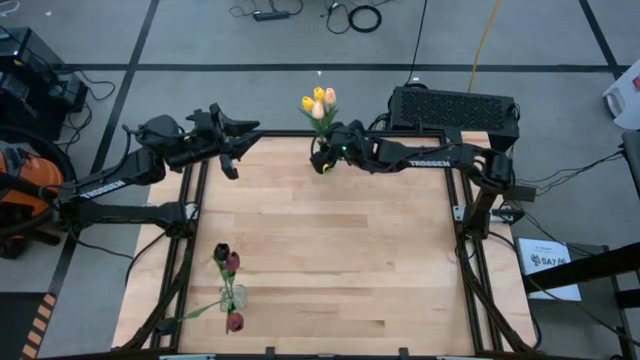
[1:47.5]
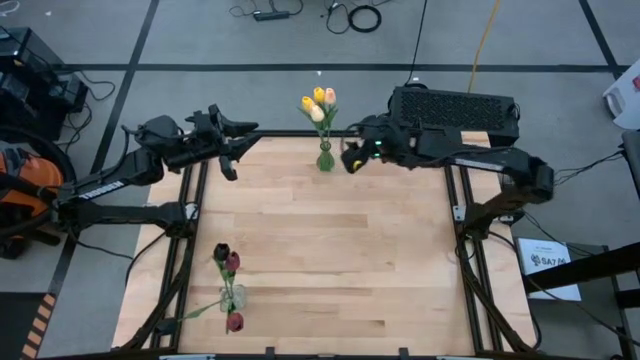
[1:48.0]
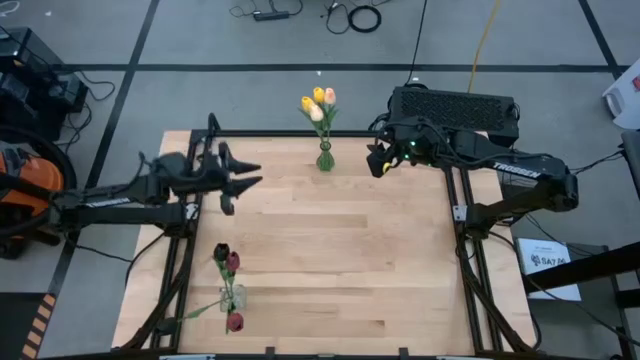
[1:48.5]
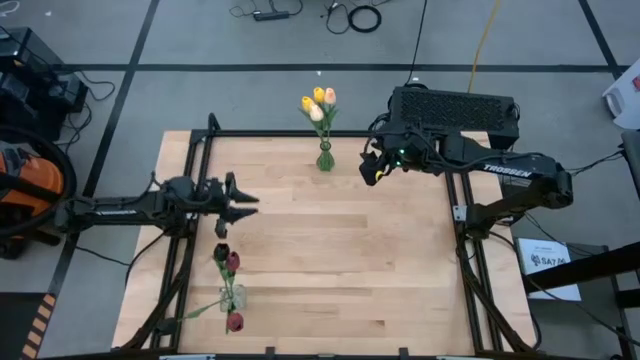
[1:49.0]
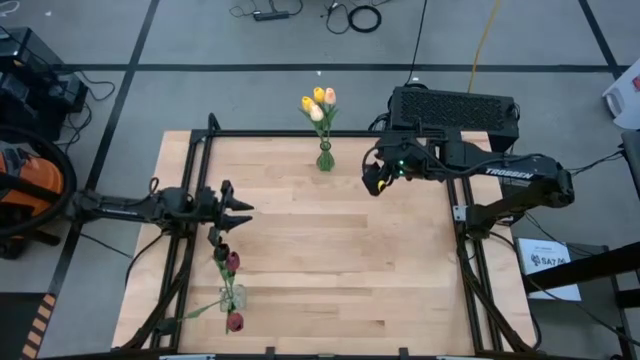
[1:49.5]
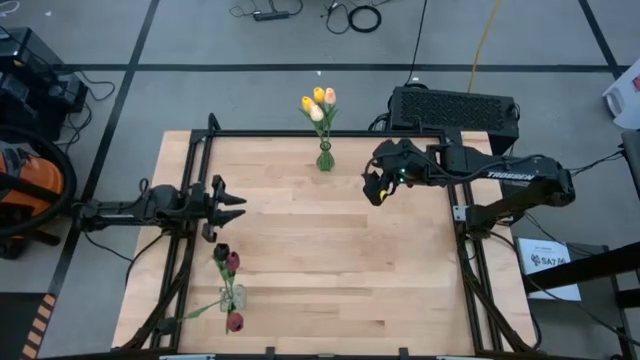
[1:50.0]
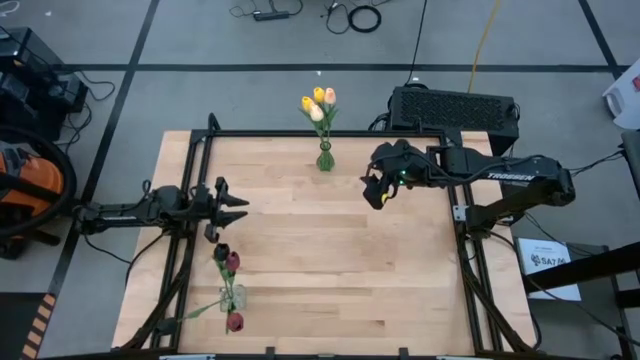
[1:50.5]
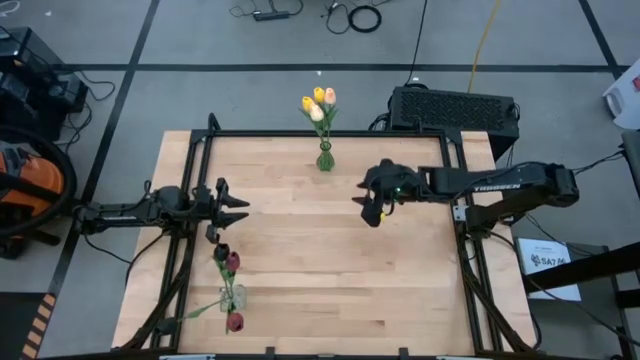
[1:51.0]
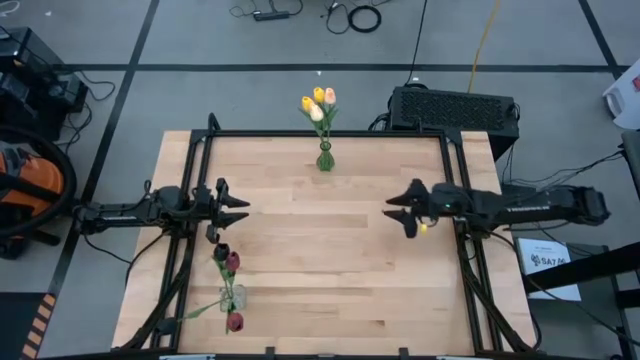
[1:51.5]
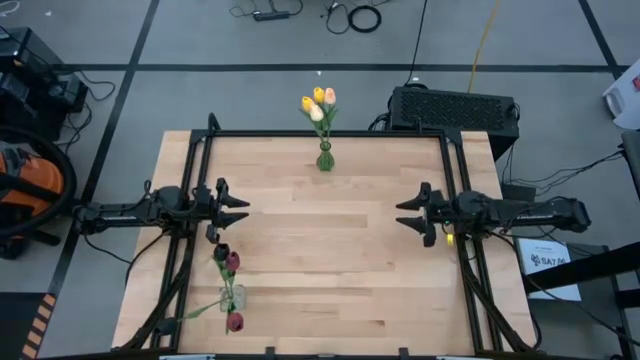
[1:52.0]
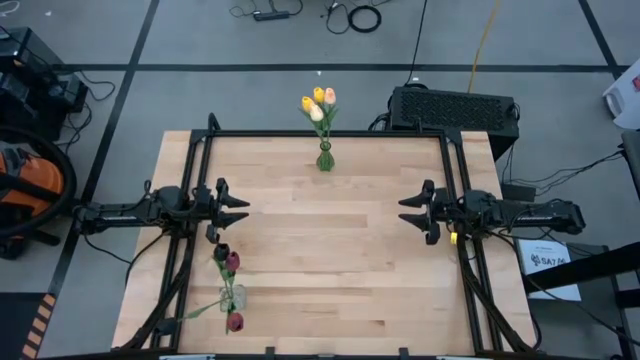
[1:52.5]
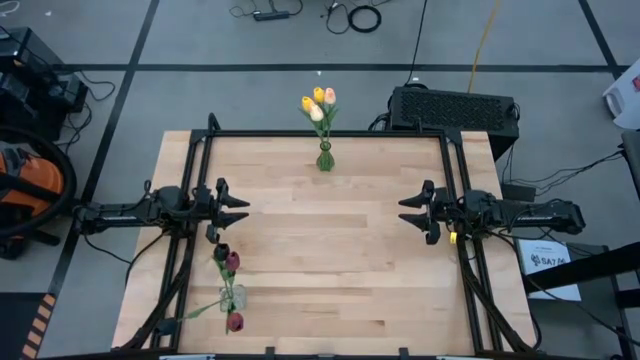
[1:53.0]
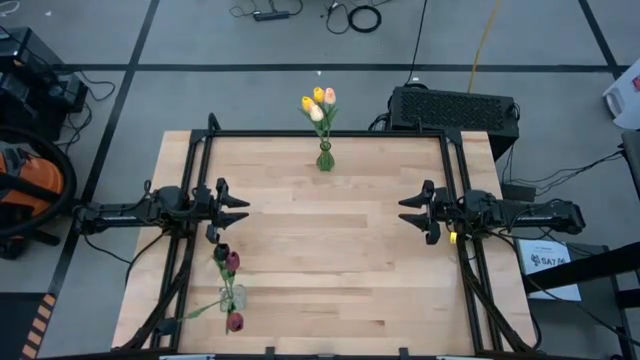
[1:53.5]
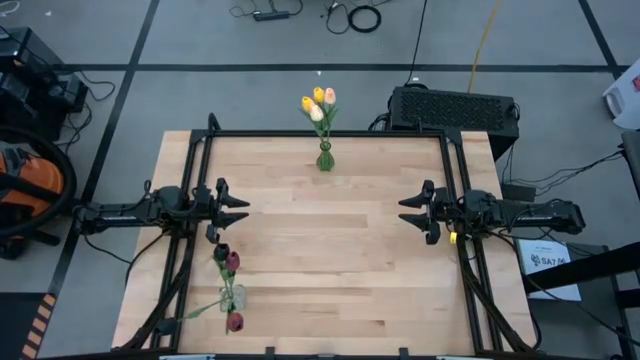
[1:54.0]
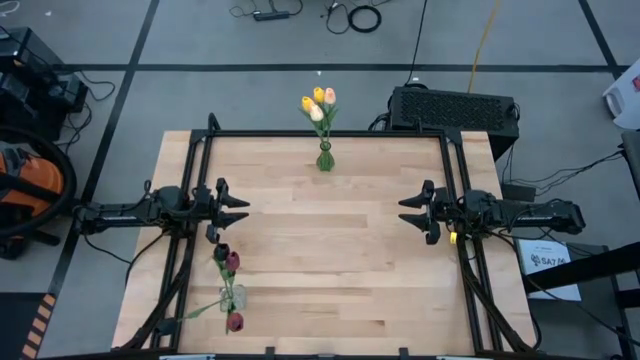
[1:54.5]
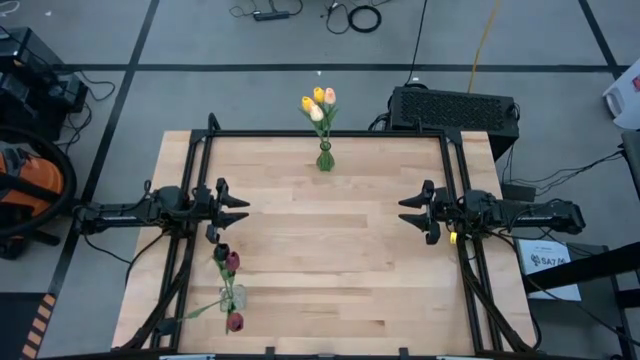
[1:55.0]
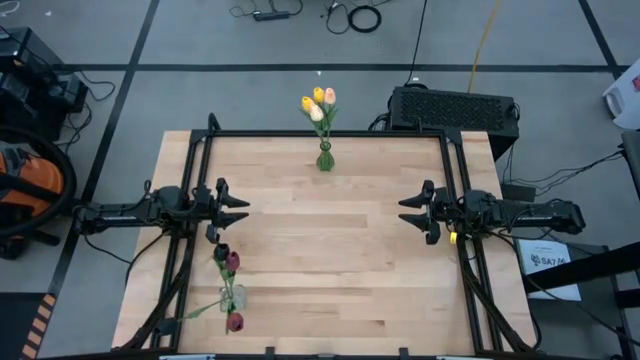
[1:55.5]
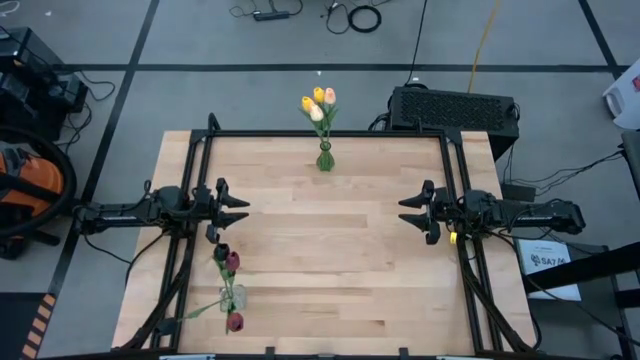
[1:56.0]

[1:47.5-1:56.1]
Task: Sort flowers into vase by color
Return to Home Position

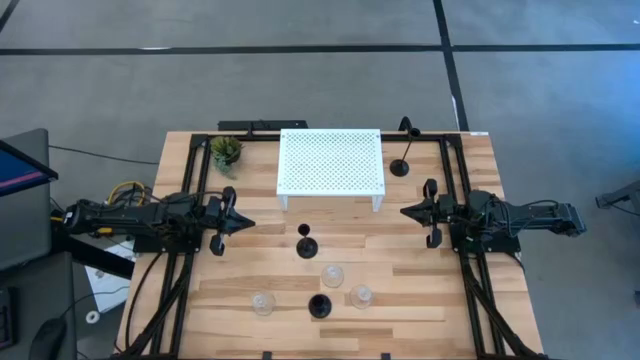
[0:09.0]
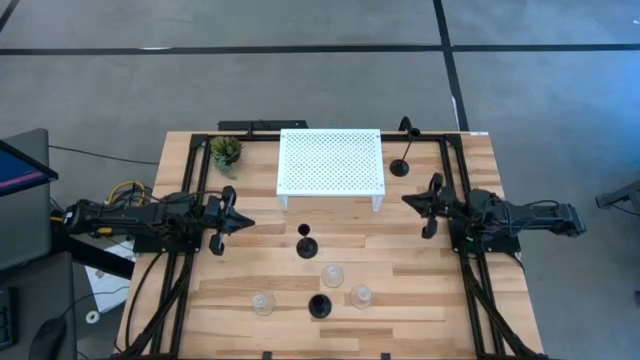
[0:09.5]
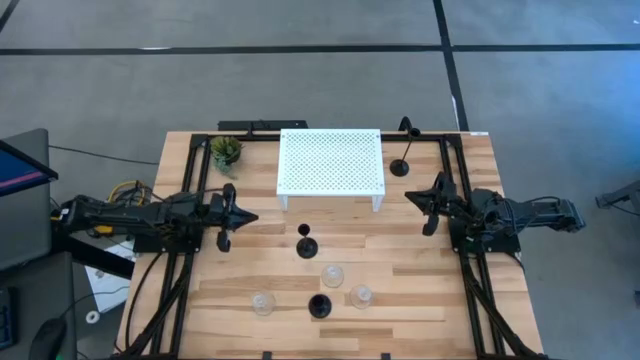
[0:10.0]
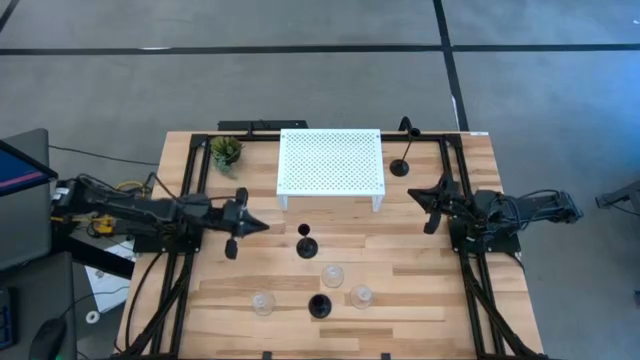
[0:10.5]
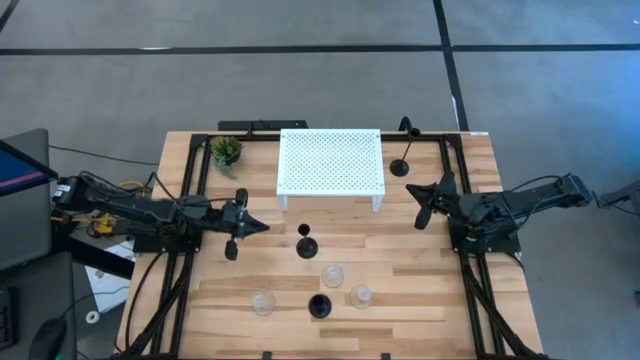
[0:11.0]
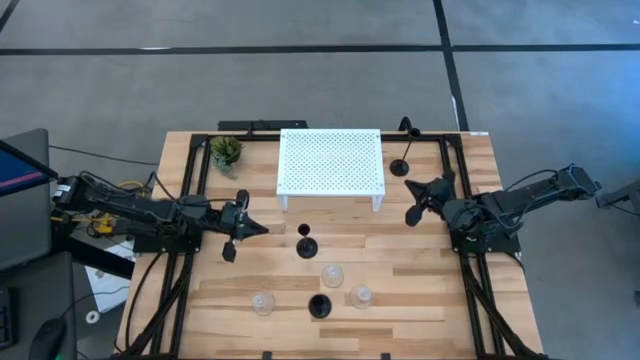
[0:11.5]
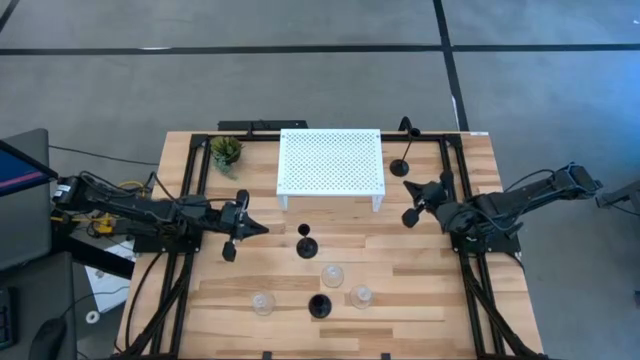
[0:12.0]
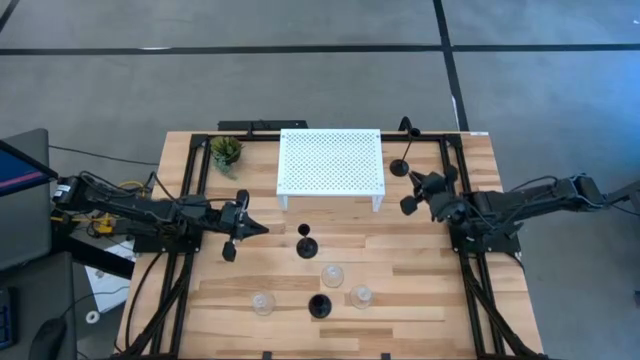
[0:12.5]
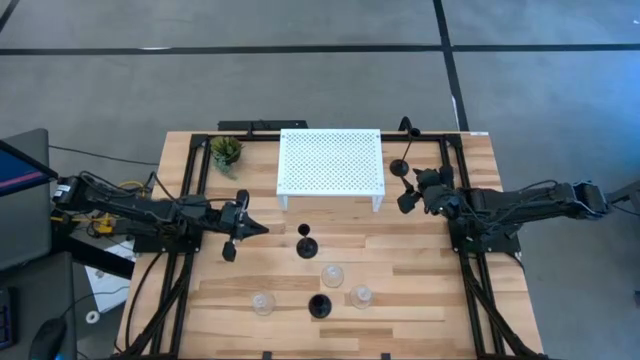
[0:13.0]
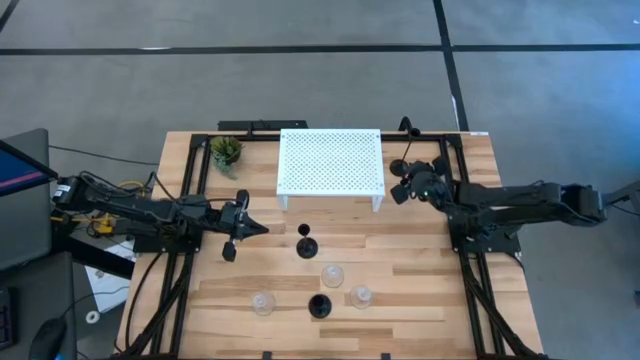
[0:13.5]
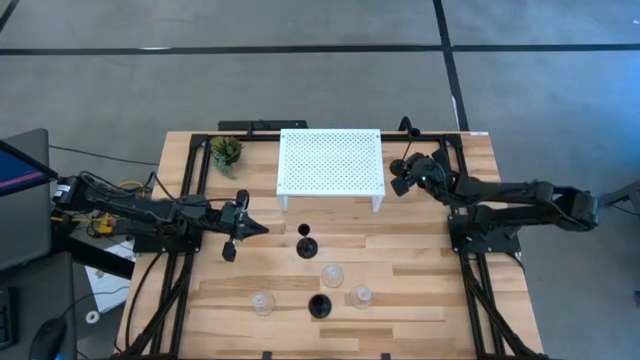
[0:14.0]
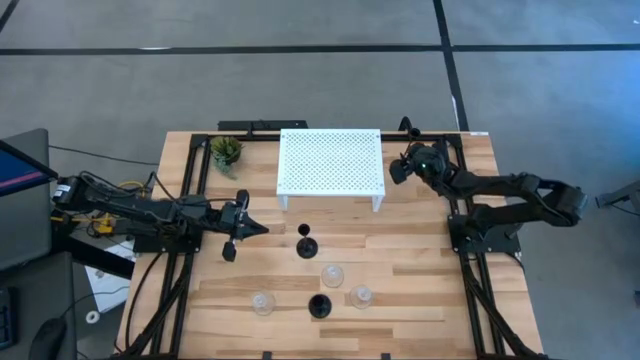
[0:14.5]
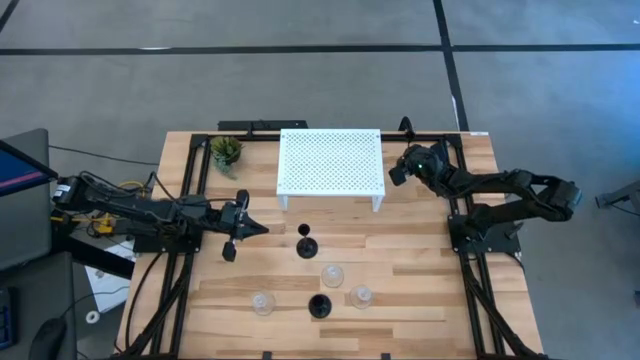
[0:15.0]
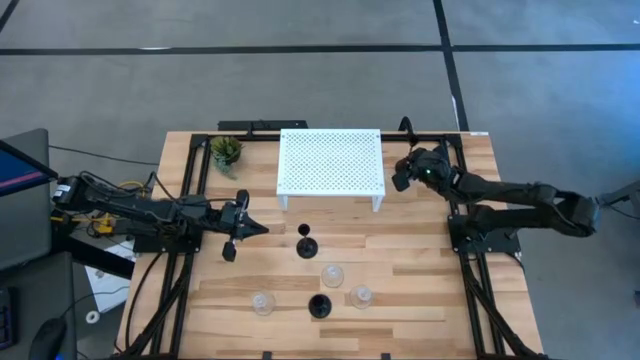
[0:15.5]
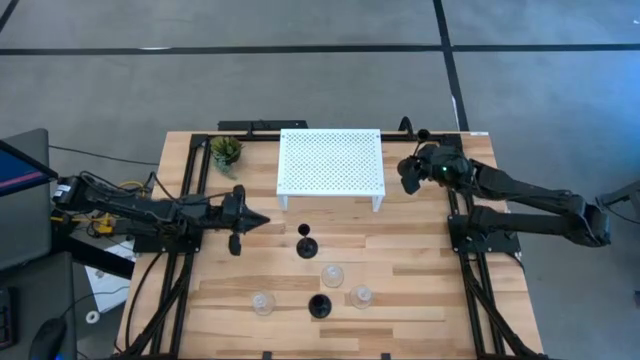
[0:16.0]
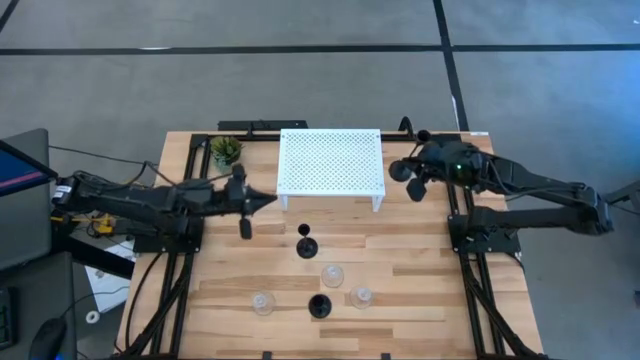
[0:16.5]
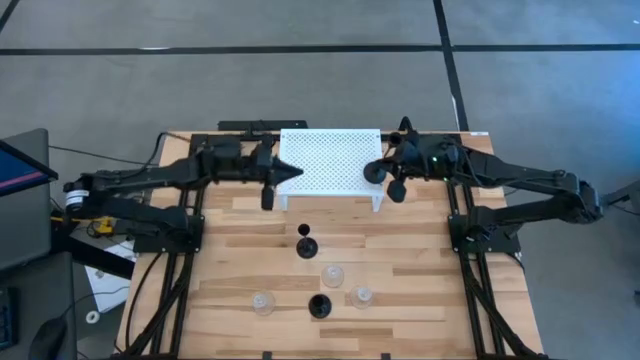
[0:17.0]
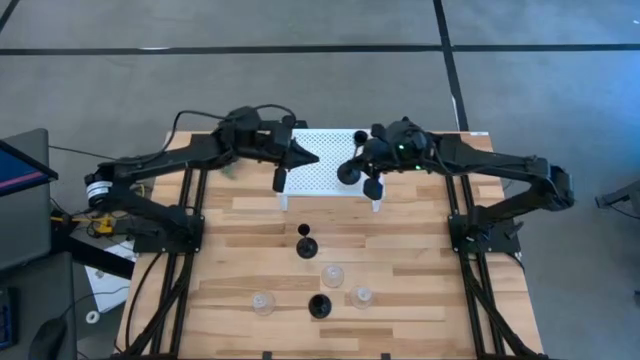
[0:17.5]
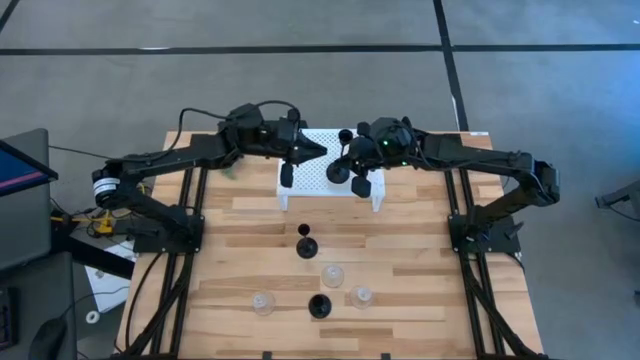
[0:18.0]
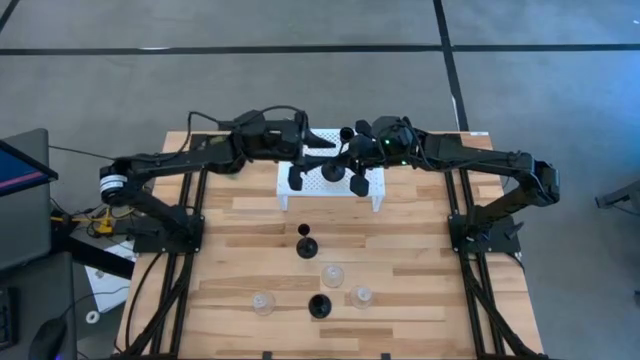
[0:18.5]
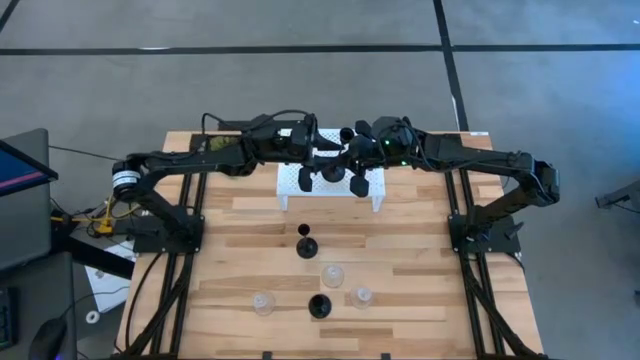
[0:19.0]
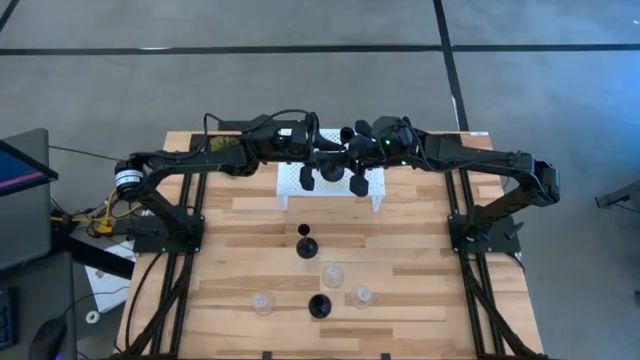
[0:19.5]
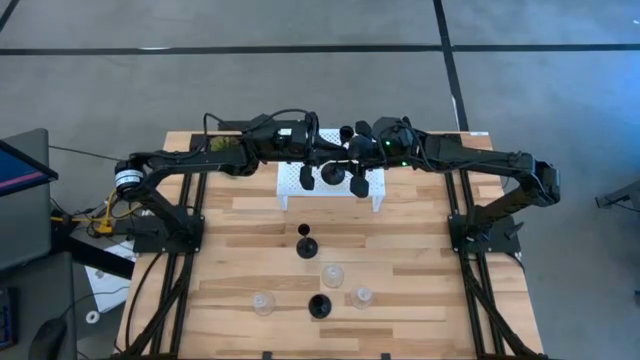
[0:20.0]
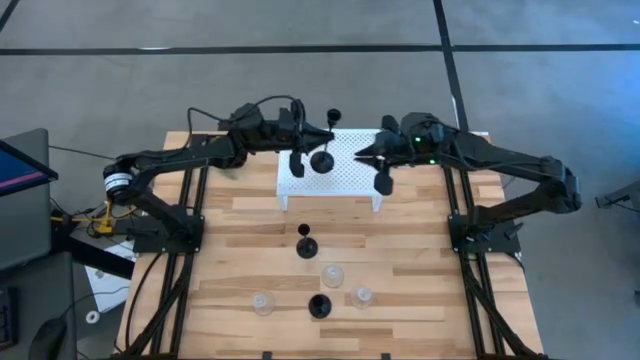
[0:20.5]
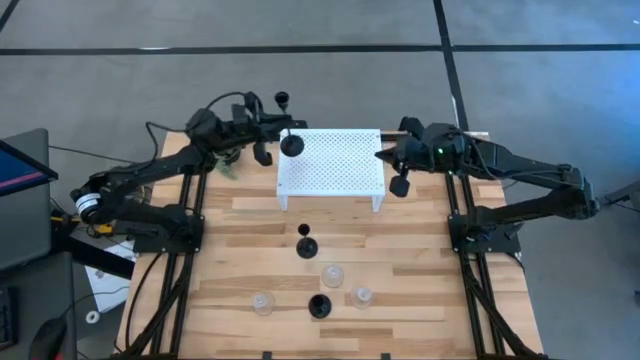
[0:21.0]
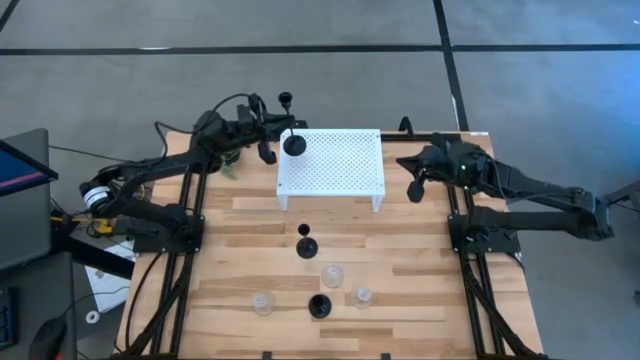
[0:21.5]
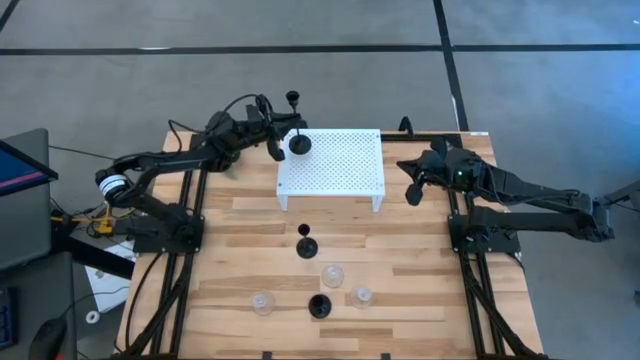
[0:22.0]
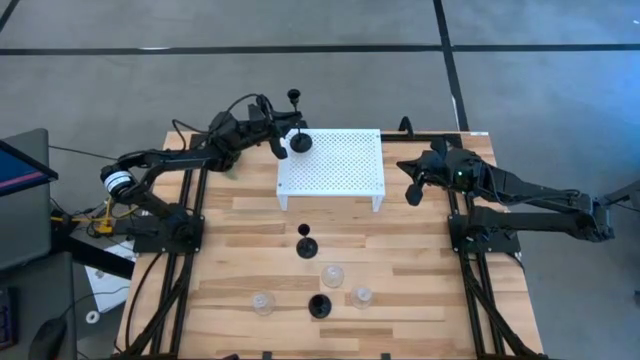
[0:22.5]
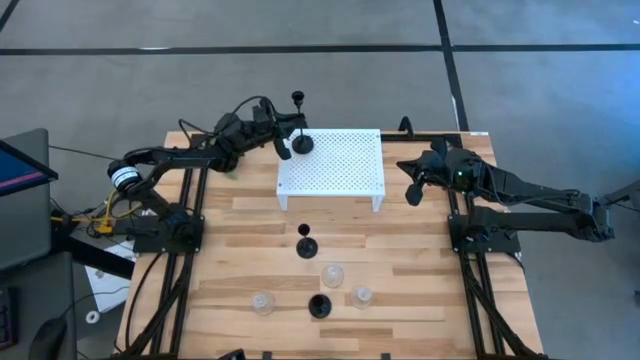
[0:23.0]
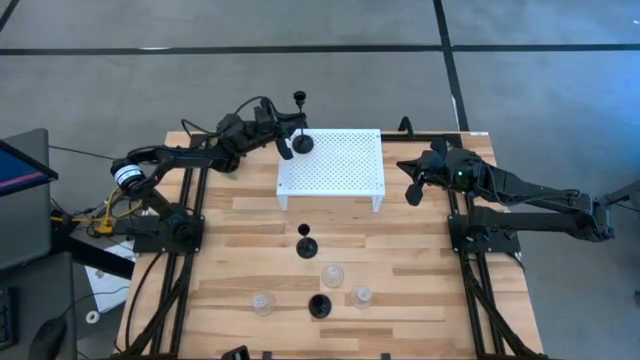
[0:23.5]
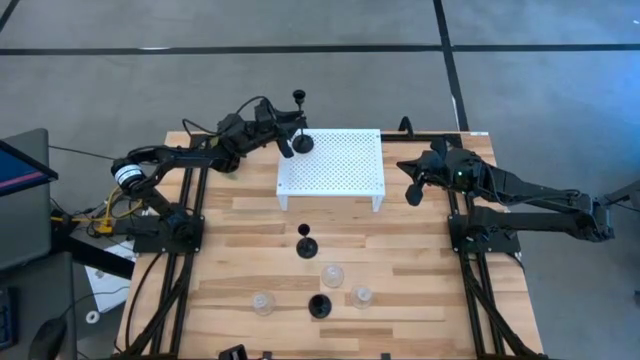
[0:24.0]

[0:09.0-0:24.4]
Task: Pick & Place candle stick holders
Put the top black candle holder on the shelf
